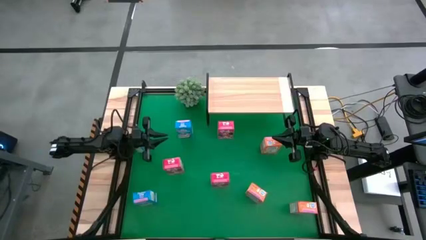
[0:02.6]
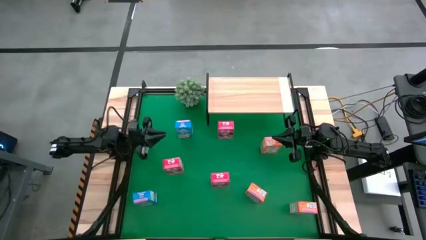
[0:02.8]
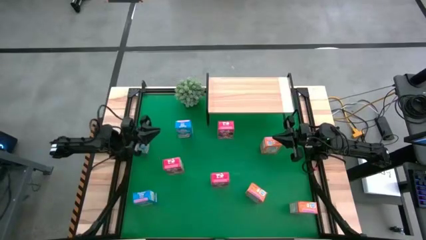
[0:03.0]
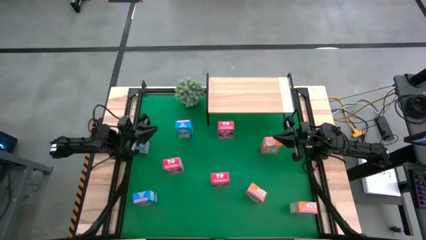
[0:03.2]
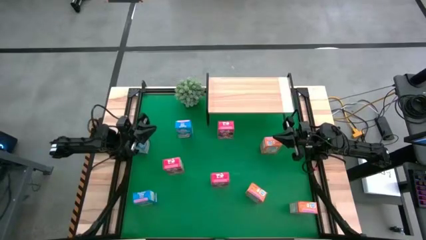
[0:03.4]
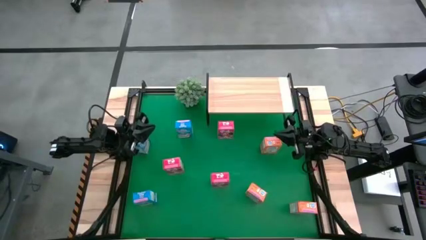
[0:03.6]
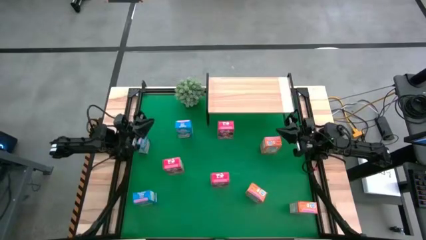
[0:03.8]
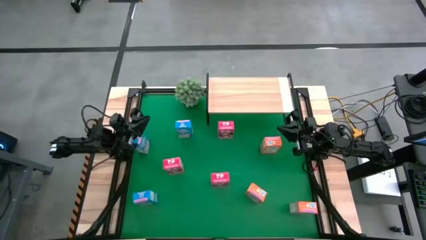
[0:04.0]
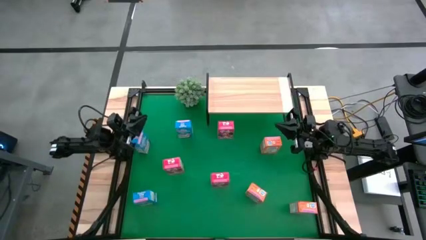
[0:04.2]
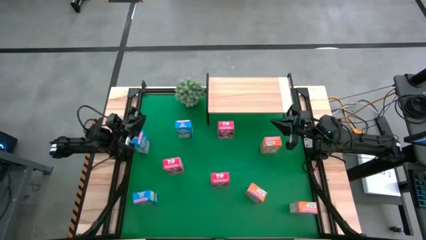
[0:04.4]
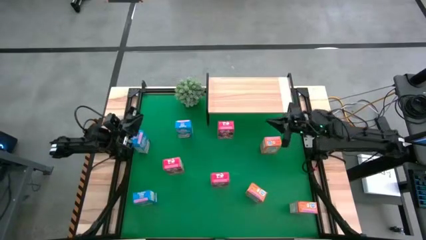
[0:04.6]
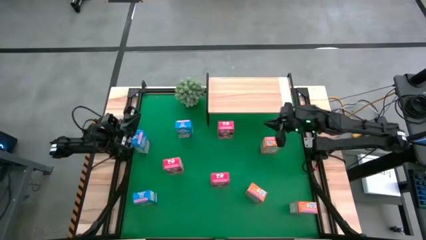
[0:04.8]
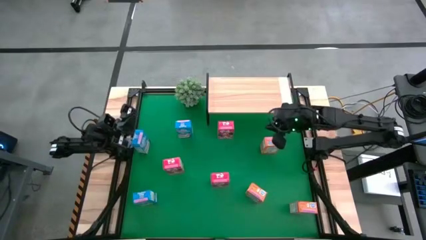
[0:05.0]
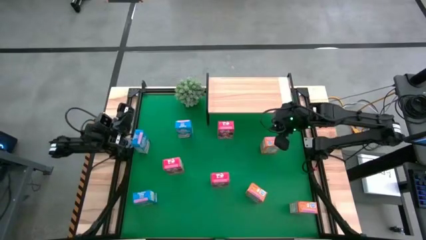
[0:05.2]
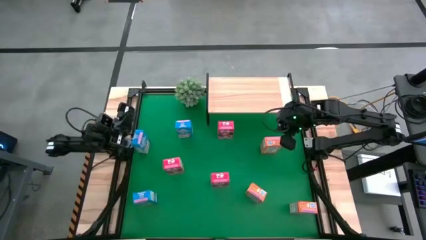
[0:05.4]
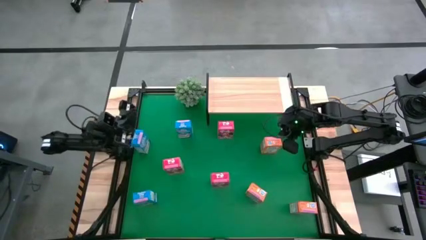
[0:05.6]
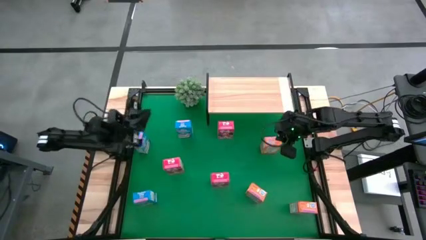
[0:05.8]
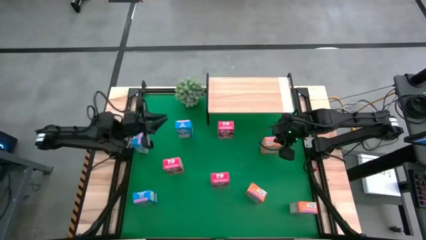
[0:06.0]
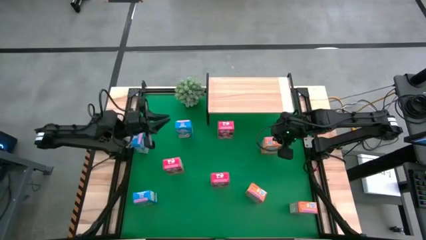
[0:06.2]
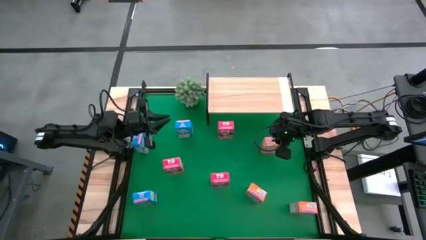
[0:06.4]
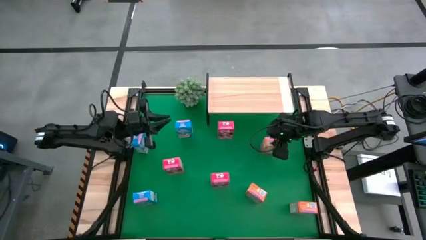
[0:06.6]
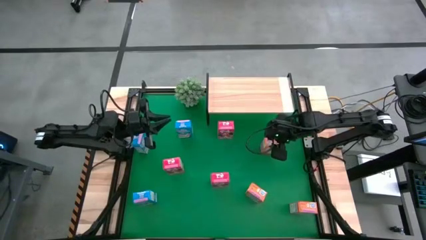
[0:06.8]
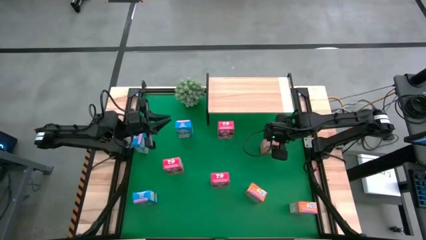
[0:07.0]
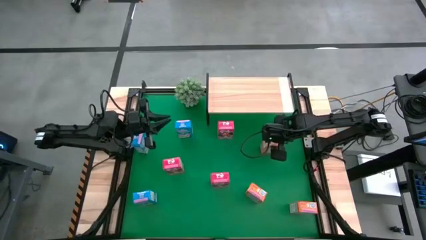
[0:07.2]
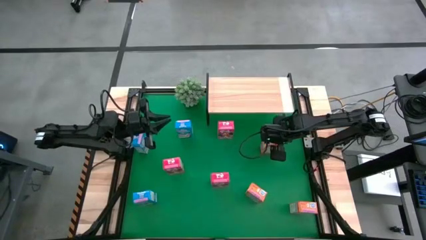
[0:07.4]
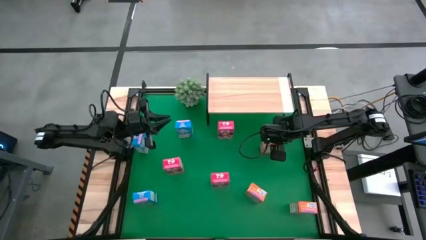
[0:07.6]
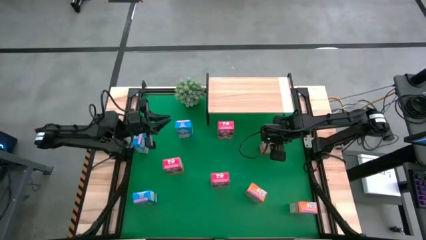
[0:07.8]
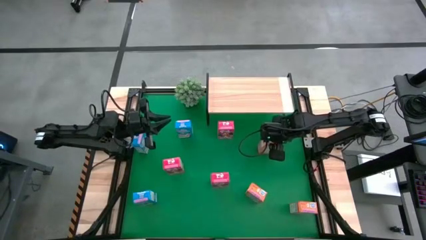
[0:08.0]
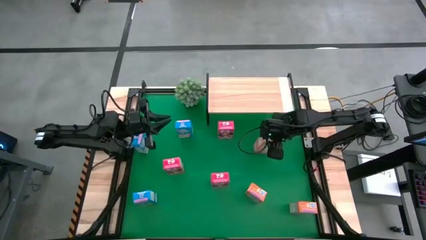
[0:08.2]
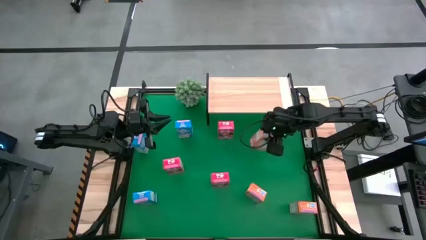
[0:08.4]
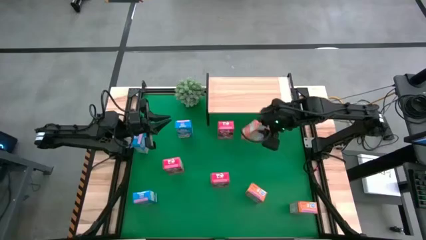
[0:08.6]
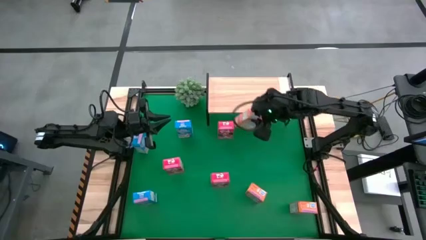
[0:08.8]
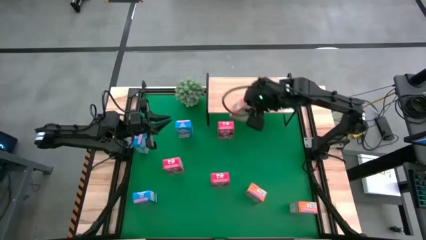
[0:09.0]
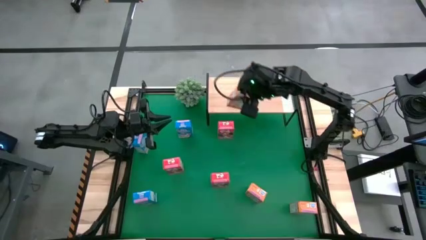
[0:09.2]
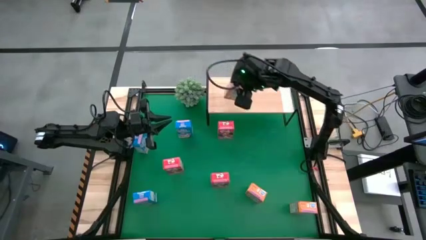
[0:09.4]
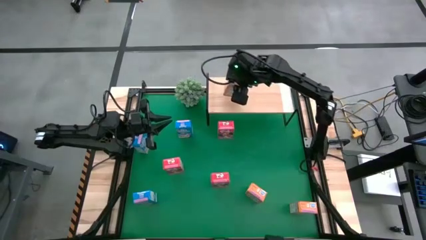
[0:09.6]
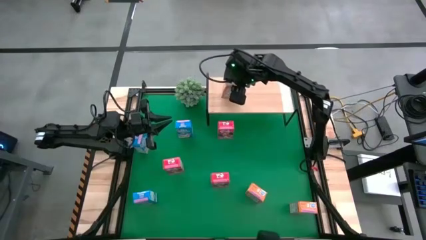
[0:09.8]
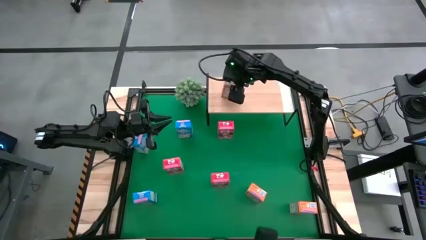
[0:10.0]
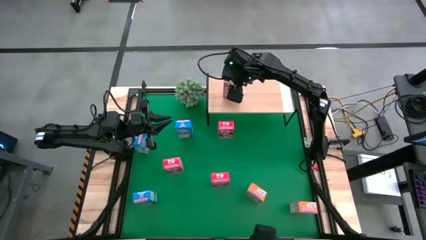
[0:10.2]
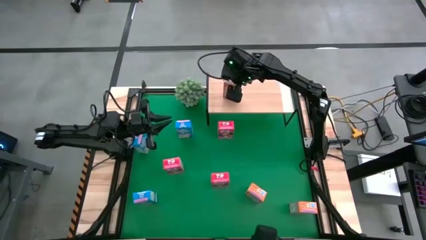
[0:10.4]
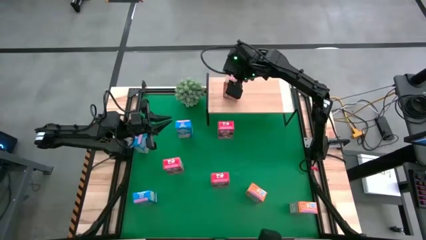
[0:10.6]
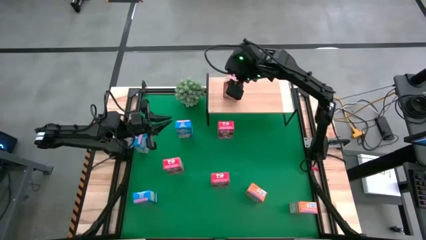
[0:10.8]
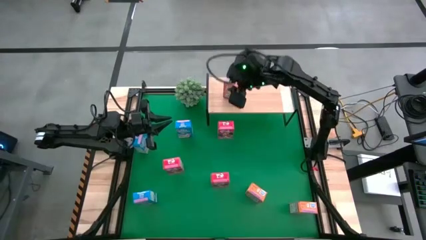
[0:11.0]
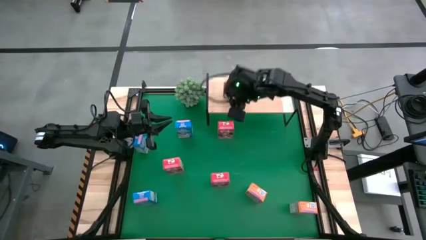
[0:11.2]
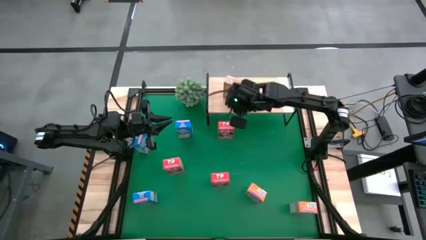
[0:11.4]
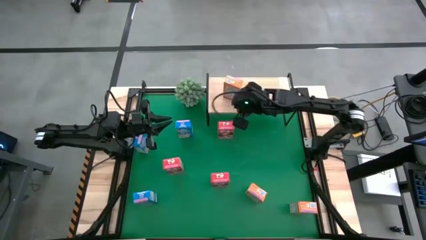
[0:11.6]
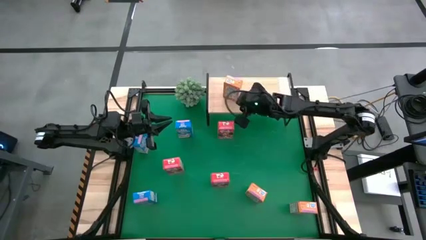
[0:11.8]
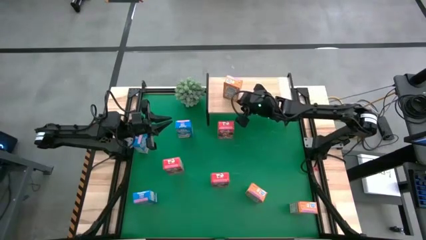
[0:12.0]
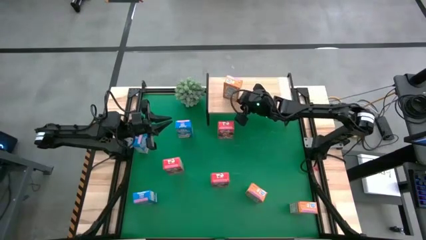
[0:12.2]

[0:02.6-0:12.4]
Task: Stack cereal on shelf
Put the top left orange cereal box on the shelf

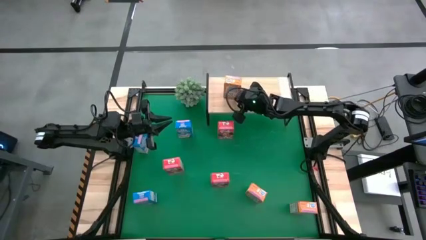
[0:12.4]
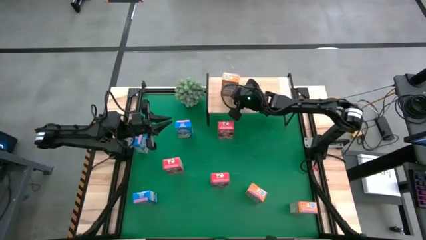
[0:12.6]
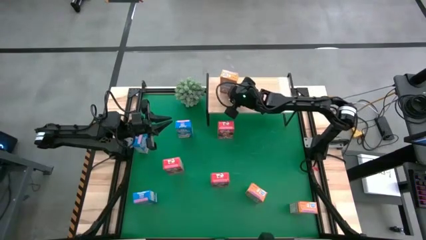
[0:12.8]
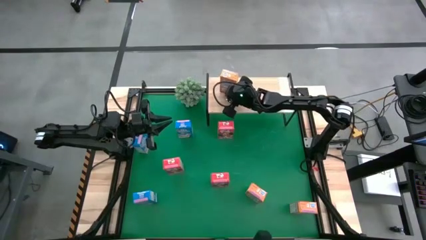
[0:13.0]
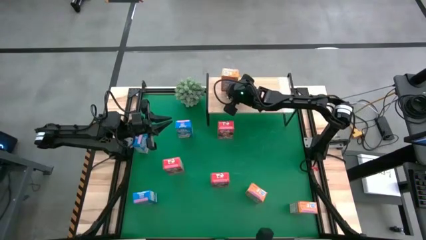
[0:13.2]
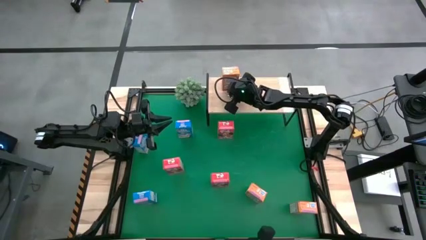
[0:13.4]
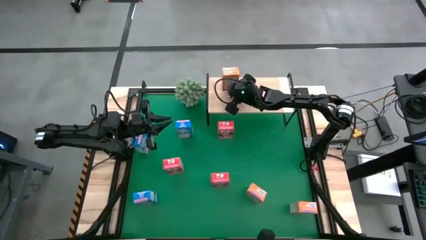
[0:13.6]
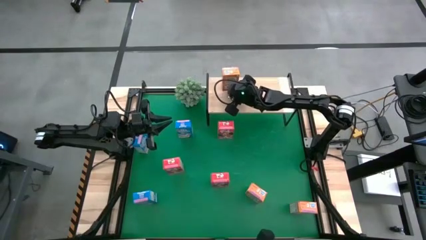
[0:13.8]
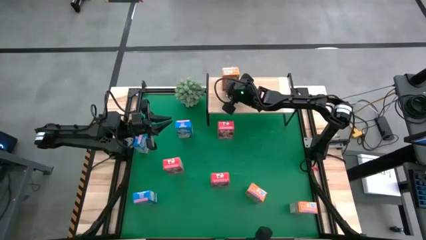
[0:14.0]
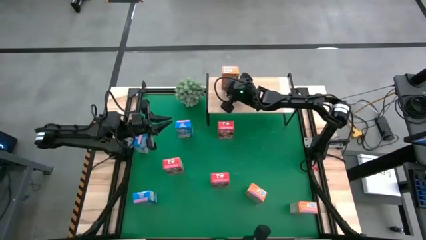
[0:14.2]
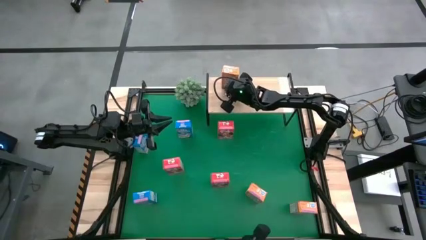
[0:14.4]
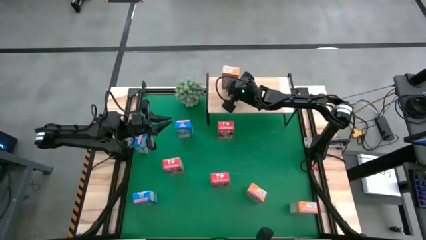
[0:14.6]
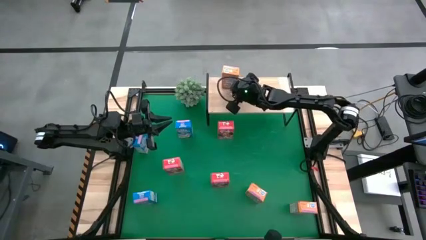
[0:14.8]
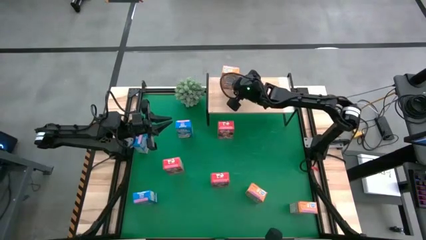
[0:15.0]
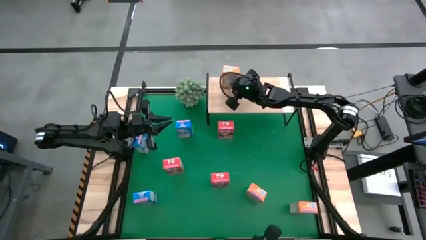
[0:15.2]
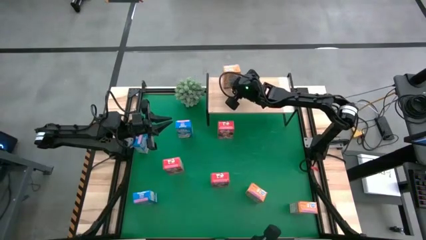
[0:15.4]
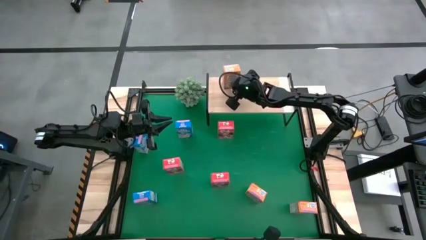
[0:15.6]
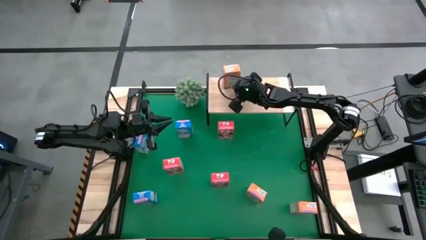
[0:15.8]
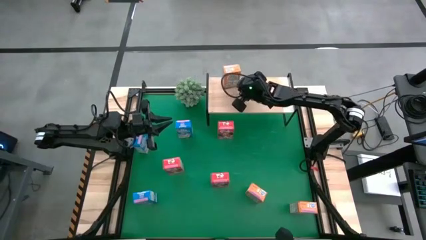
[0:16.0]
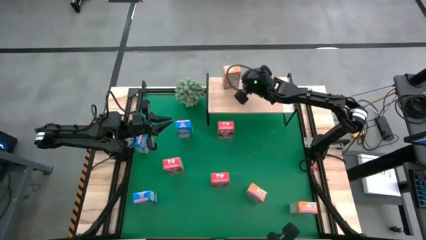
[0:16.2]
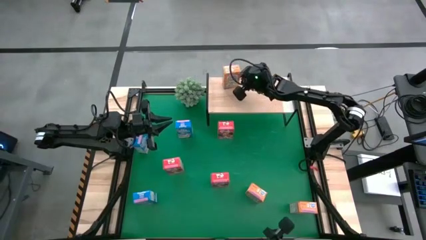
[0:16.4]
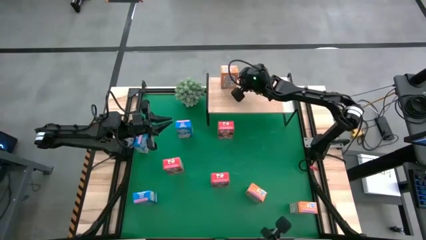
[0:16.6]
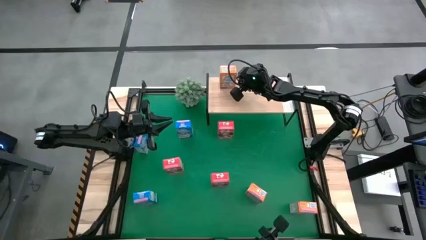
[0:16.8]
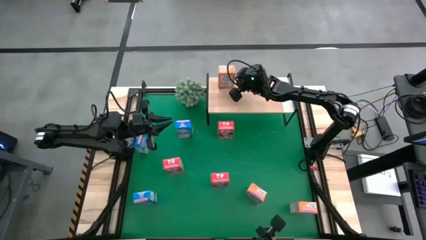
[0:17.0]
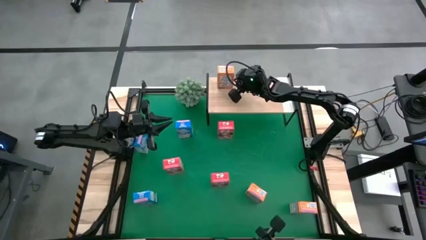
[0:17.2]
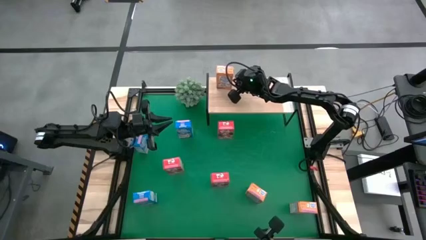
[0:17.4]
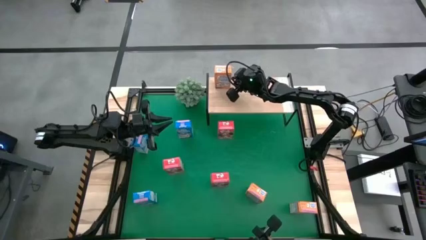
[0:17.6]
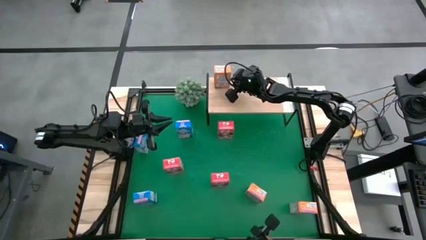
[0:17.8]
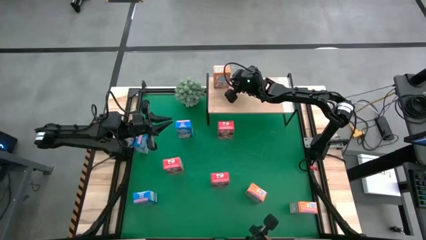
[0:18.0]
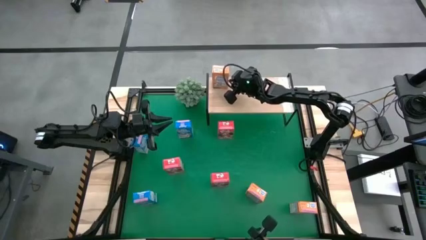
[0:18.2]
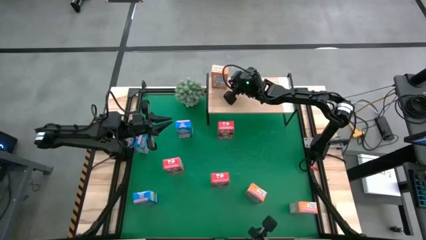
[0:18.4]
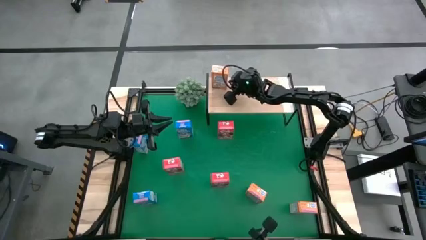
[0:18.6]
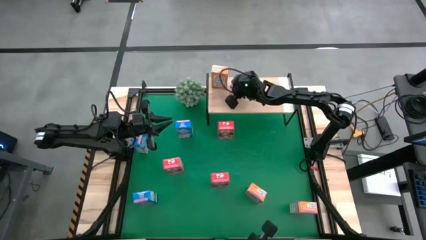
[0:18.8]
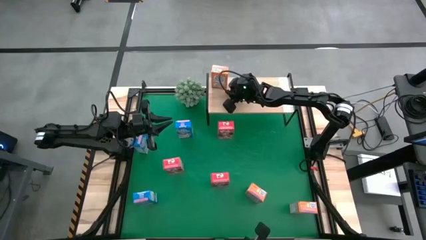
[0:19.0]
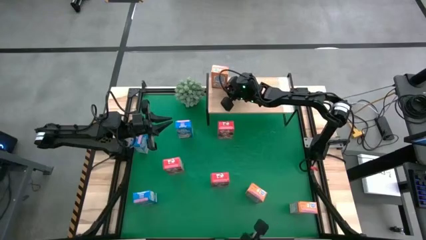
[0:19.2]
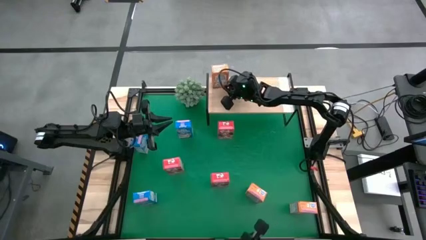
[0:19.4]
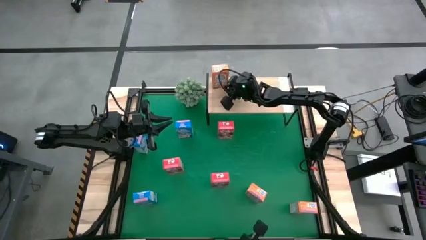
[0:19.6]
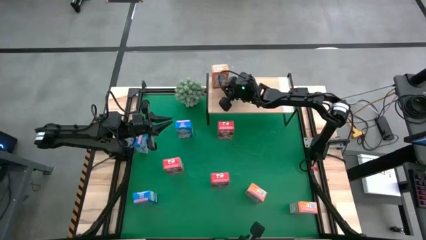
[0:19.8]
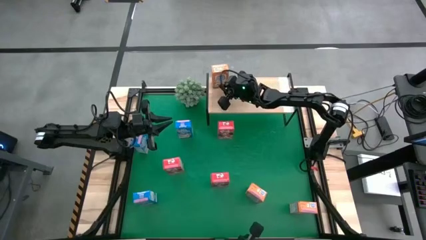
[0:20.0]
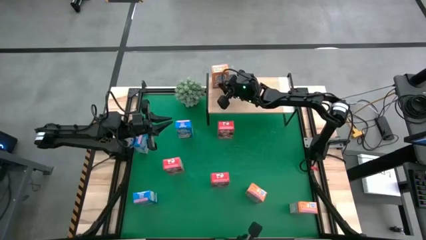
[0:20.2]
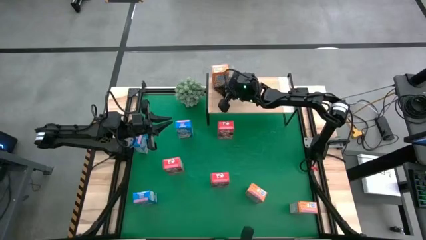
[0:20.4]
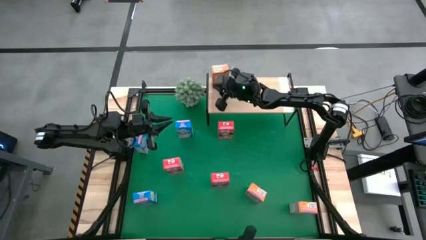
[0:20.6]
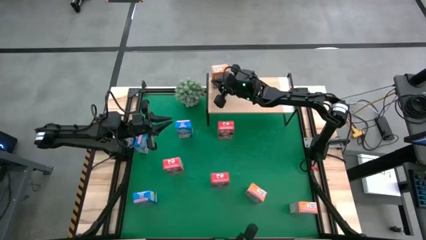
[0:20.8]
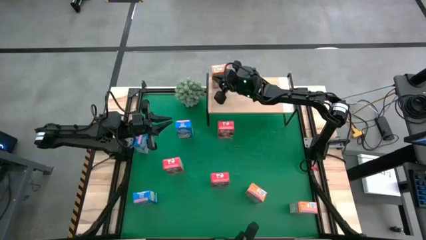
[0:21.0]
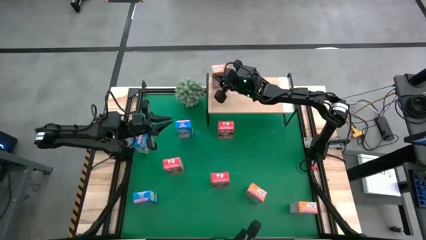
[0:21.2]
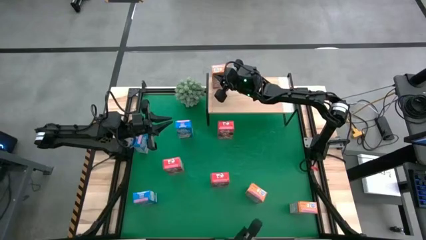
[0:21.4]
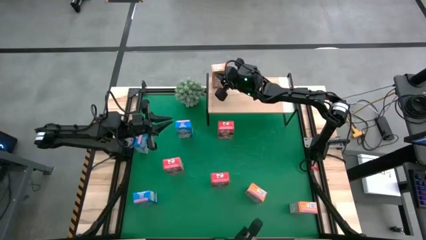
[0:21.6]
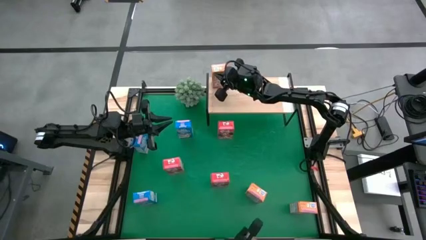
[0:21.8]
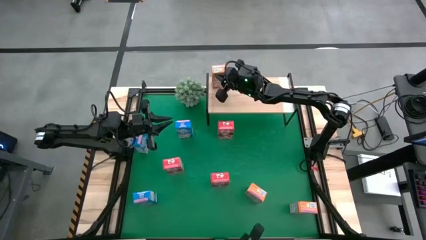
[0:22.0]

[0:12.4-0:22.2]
Put the top left orange cereal box on the shelf
